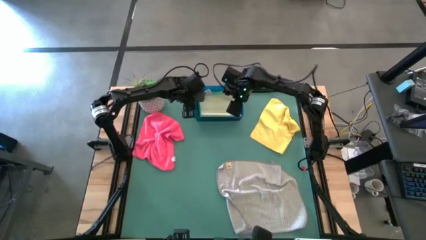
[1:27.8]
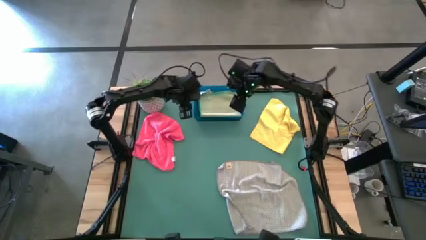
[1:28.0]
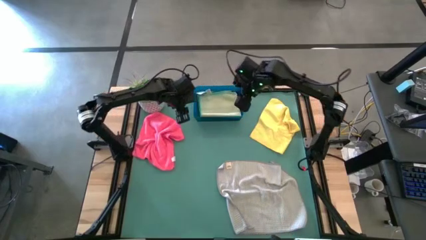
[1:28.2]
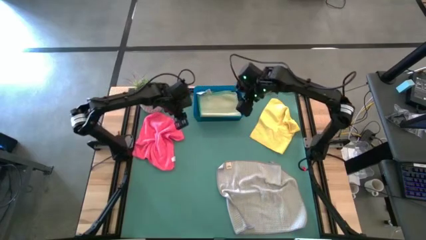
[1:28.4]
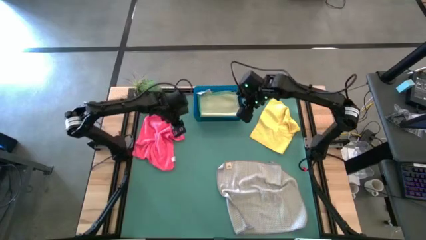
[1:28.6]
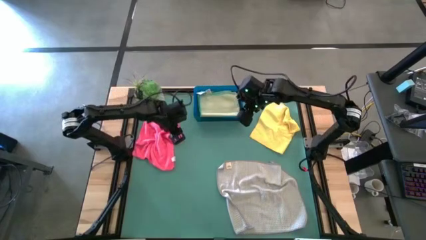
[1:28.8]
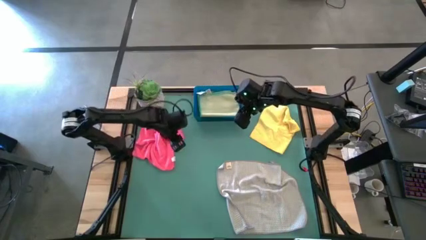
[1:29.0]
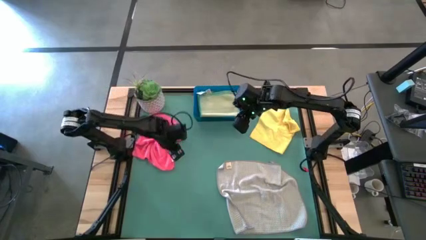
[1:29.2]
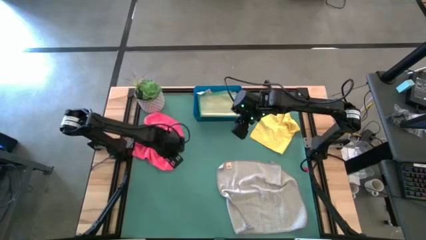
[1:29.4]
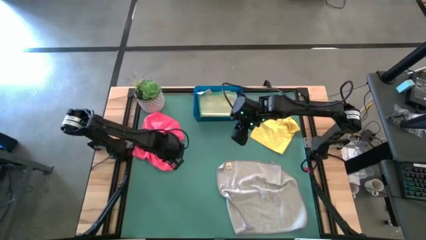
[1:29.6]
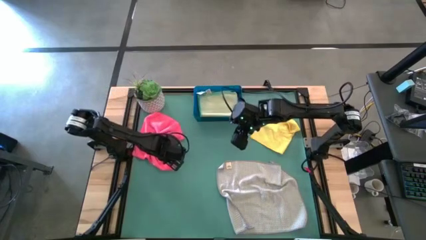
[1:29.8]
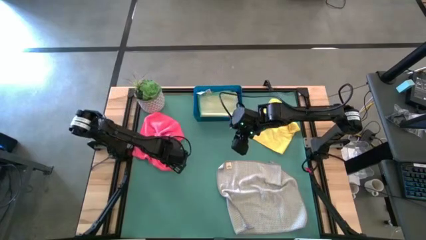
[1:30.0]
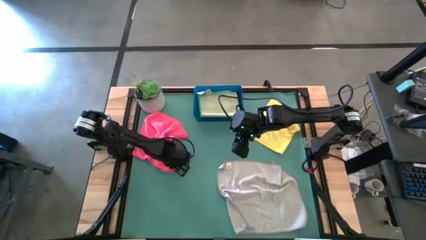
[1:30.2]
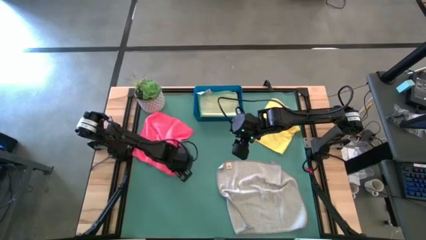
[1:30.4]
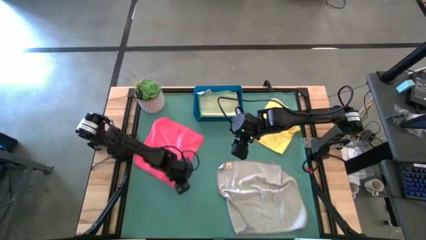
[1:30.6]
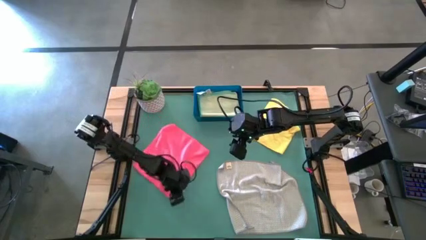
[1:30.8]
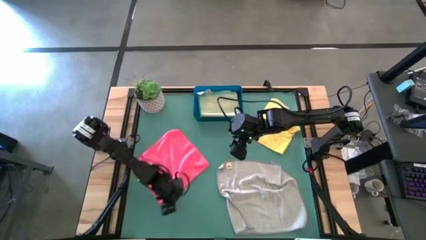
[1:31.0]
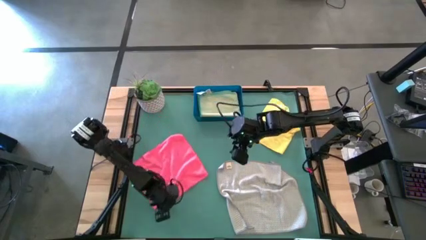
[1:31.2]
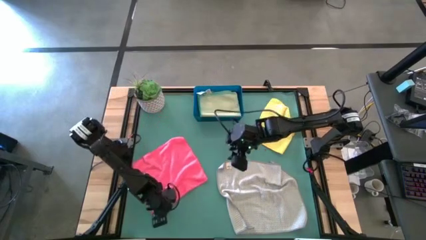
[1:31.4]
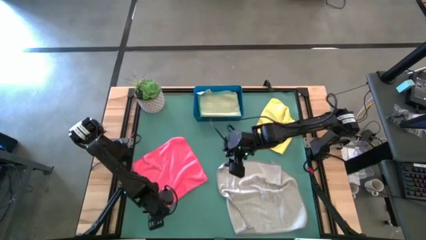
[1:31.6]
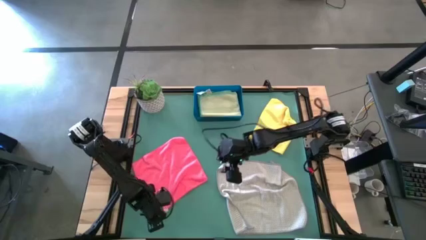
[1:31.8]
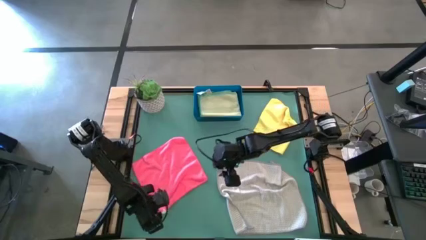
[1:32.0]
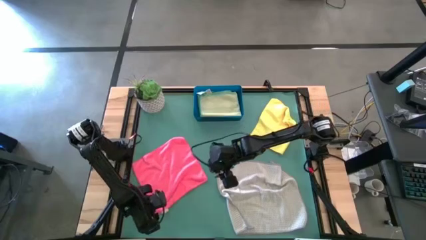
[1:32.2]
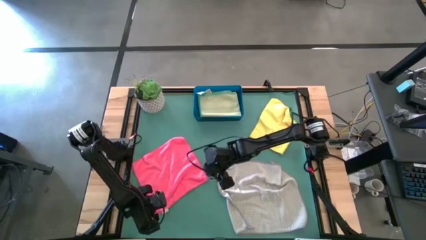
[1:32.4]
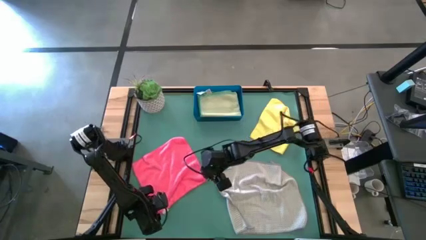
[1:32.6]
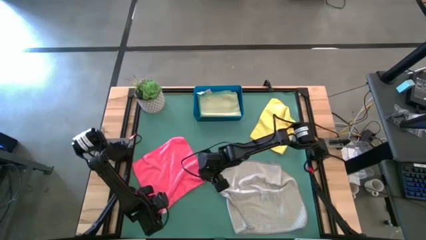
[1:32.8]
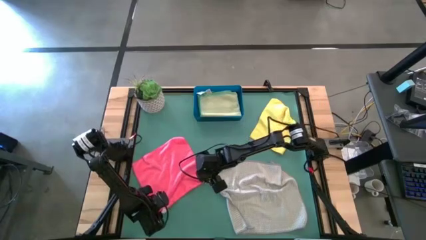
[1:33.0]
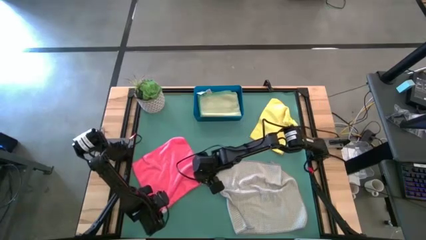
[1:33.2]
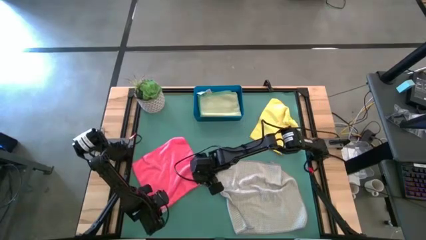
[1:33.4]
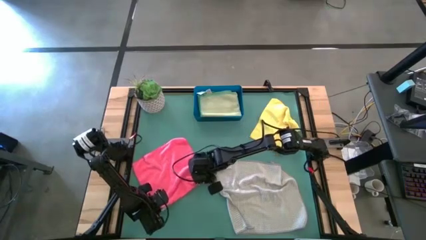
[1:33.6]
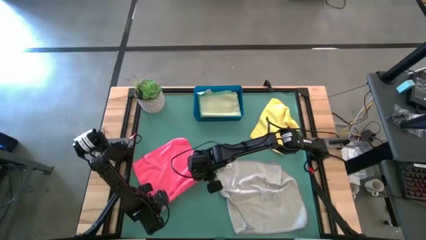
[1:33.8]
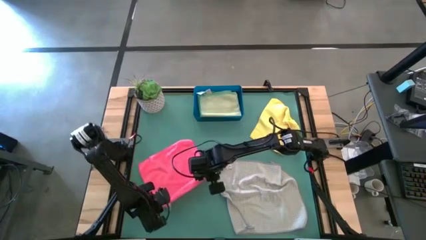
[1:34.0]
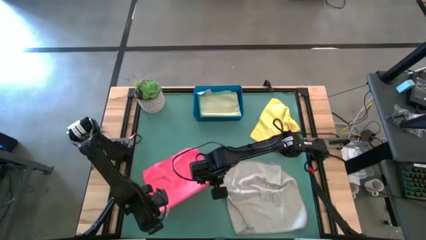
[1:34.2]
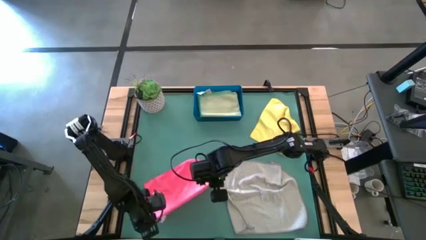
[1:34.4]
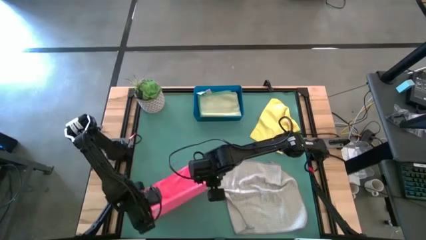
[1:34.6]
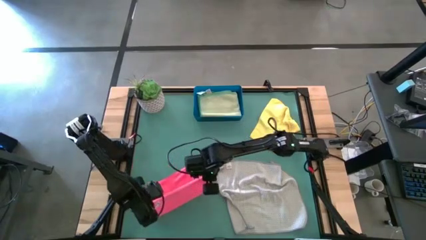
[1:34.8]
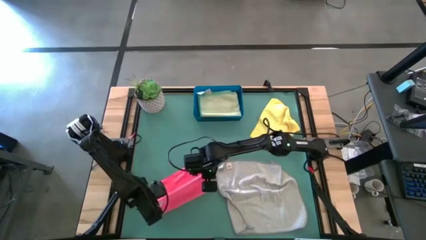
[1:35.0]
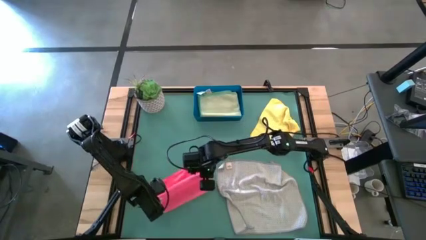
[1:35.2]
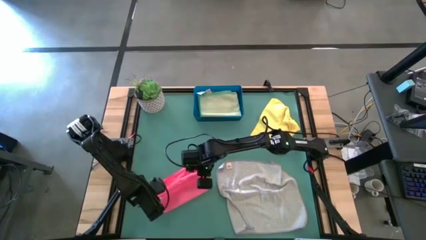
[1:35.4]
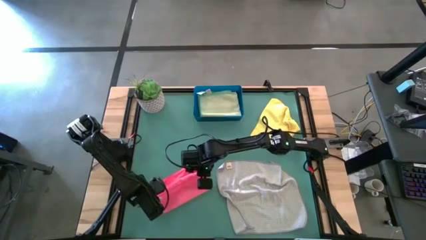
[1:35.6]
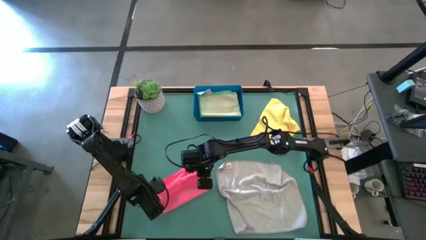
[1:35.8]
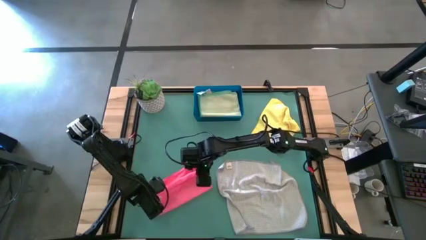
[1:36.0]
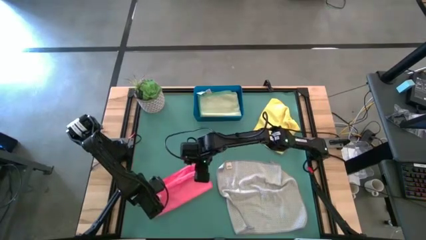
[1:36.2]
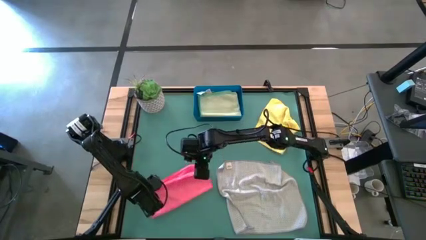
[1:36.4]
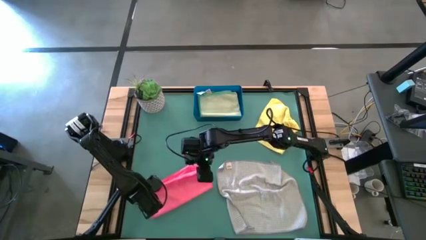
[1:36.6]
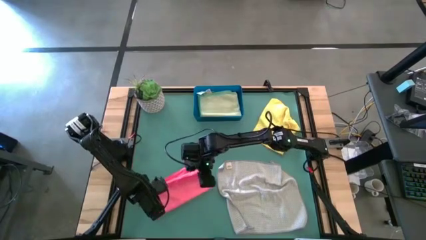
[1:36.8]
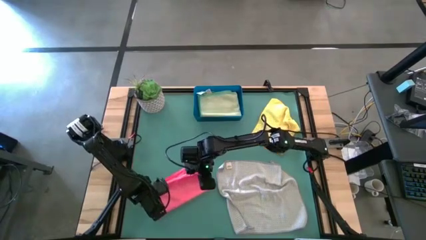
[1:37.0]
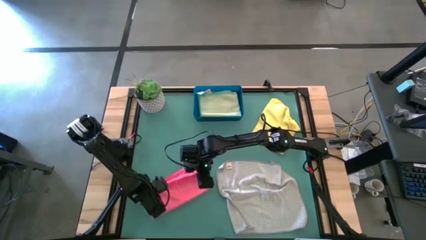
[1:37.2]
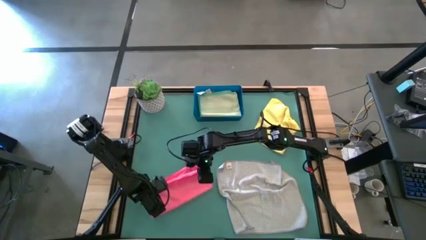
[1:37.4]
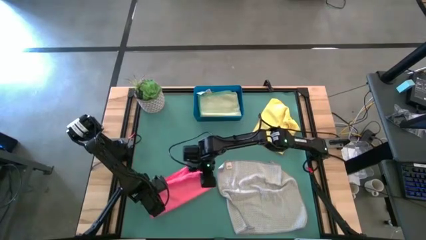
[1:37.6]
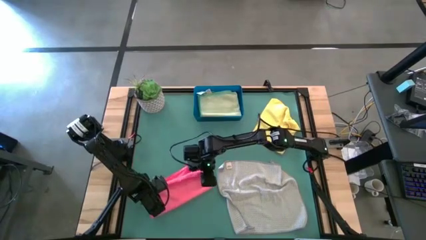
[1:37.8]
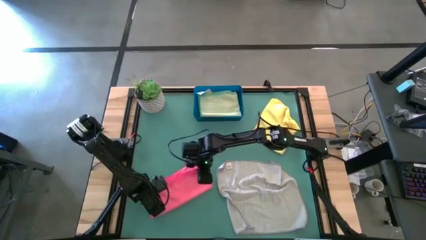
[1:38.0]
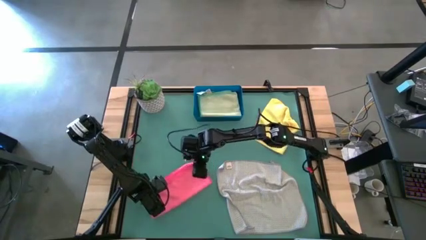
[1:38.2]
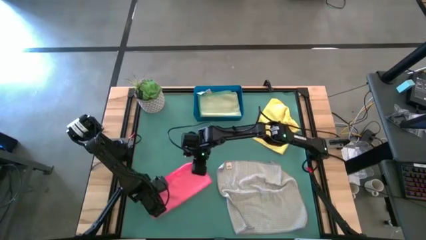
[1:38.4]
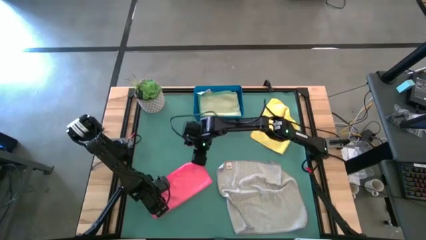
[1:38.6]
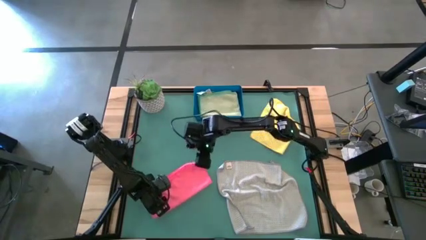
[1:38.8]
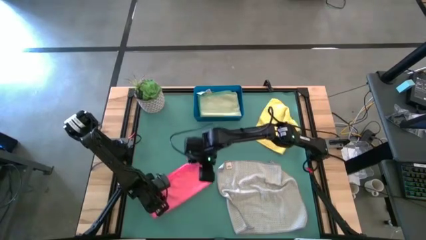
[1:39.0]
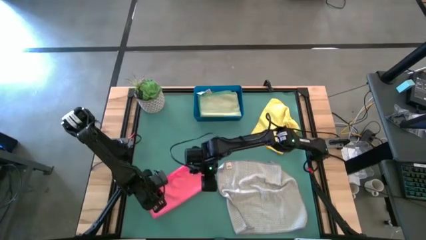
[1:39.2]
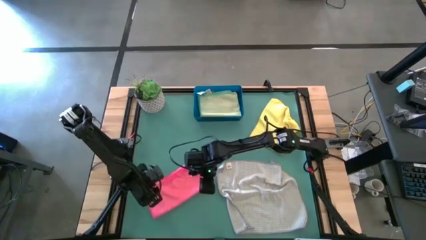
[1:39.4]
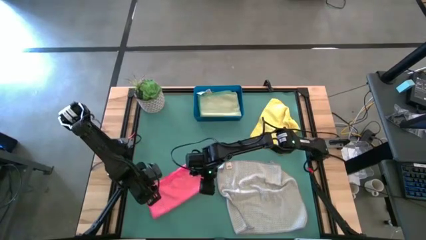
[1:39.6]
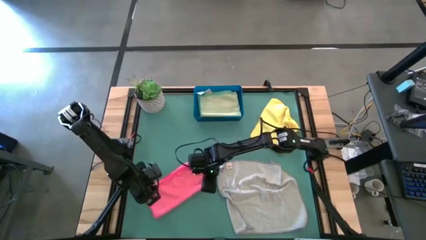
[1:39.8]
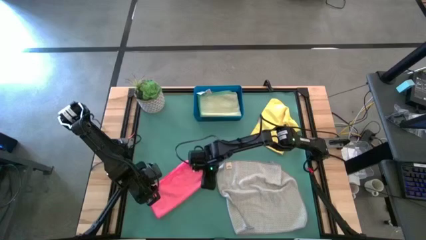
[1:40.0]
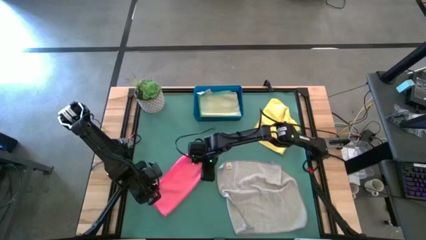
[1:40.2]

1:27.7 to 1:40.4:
Task: Fold microfiber towels
Fold the pink microfiber towel

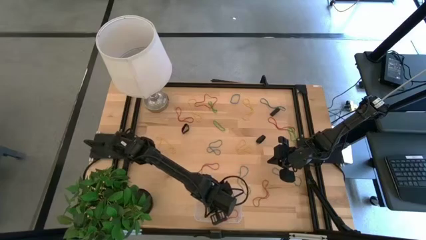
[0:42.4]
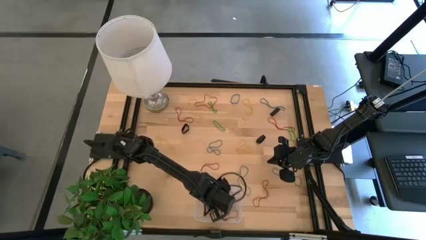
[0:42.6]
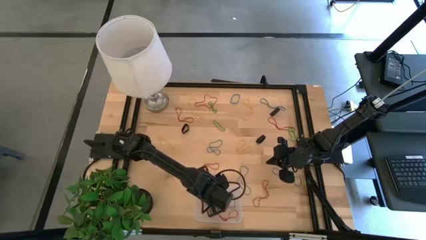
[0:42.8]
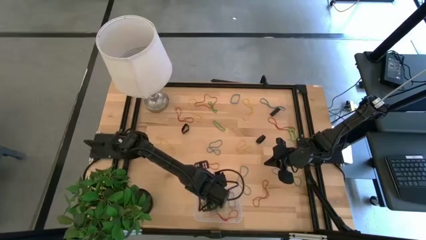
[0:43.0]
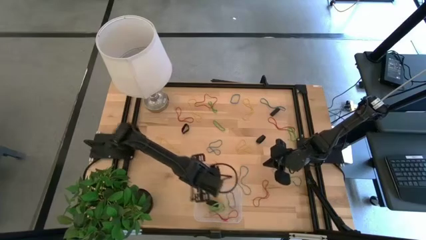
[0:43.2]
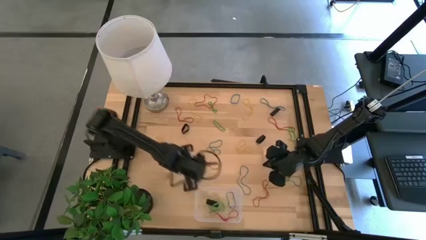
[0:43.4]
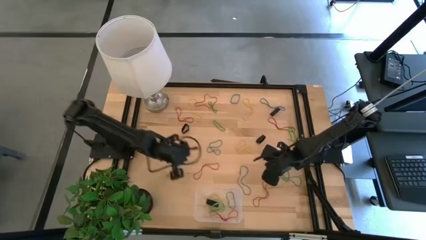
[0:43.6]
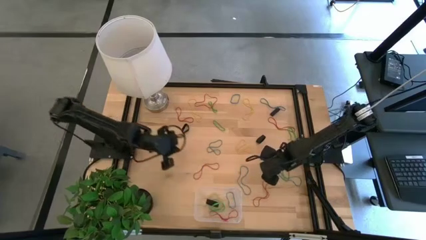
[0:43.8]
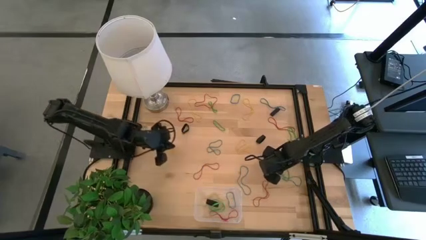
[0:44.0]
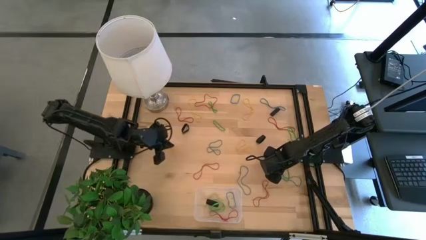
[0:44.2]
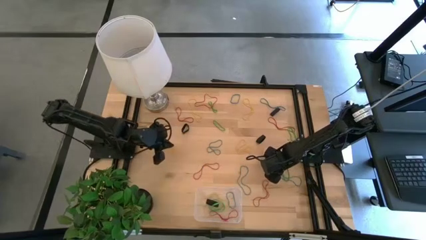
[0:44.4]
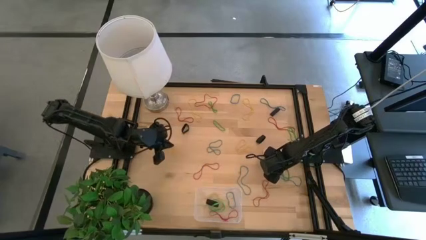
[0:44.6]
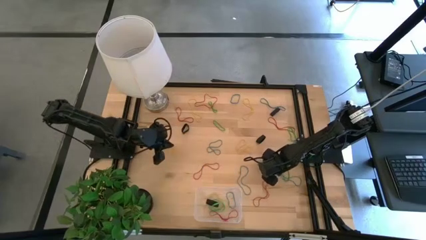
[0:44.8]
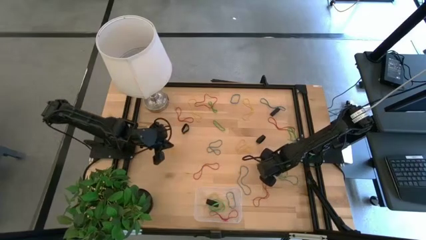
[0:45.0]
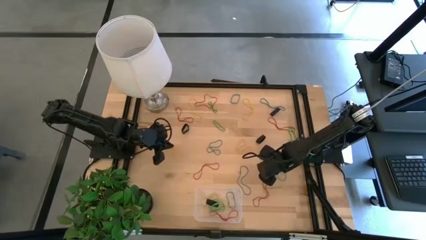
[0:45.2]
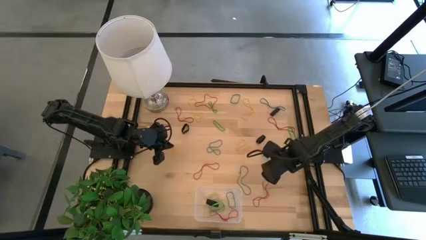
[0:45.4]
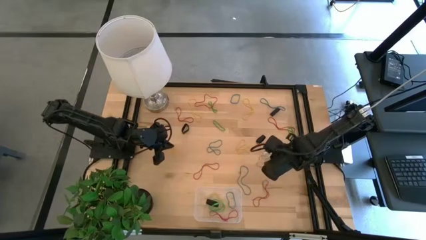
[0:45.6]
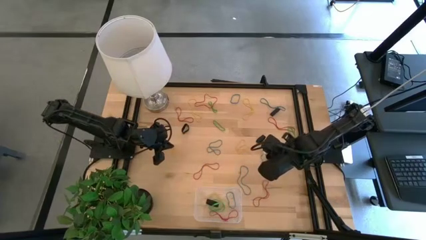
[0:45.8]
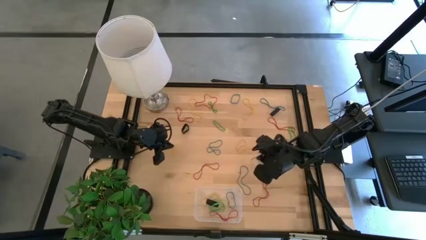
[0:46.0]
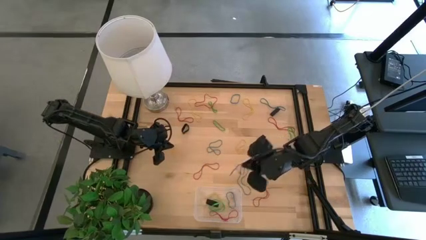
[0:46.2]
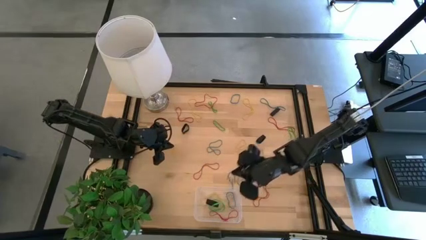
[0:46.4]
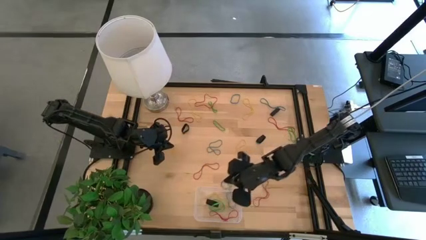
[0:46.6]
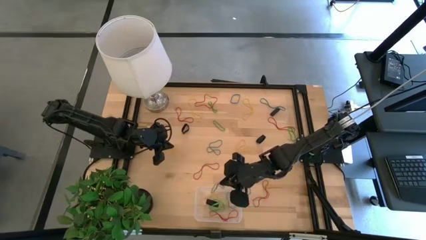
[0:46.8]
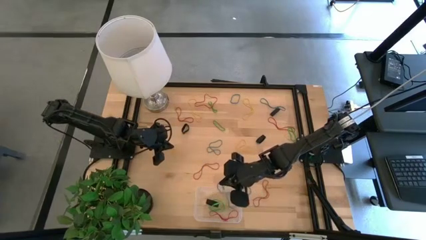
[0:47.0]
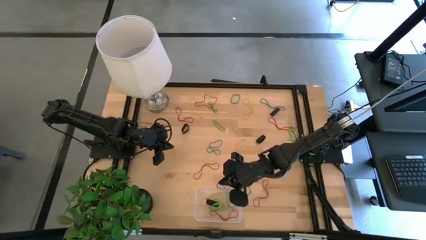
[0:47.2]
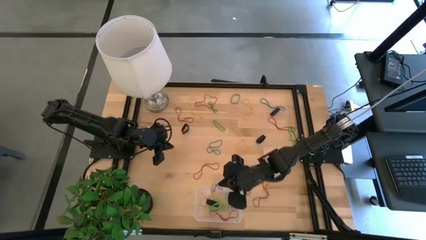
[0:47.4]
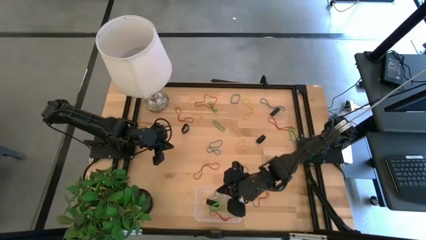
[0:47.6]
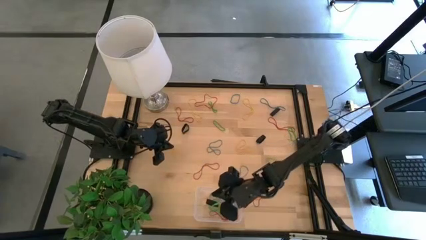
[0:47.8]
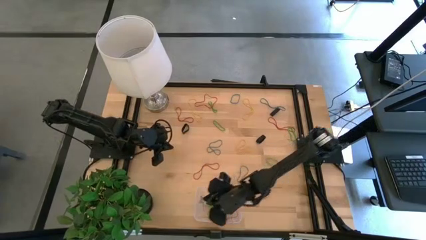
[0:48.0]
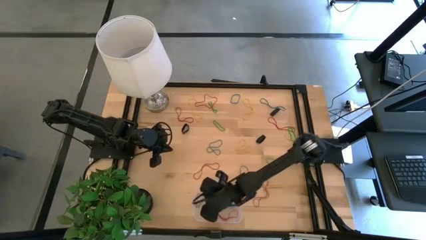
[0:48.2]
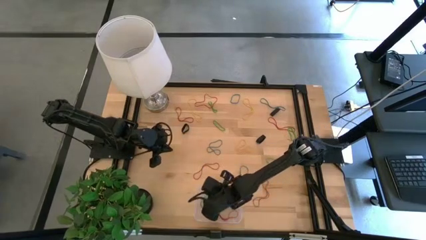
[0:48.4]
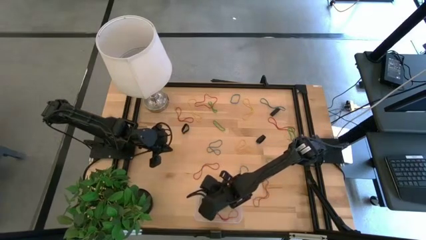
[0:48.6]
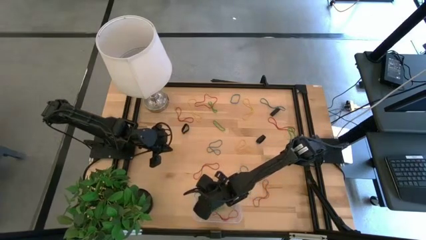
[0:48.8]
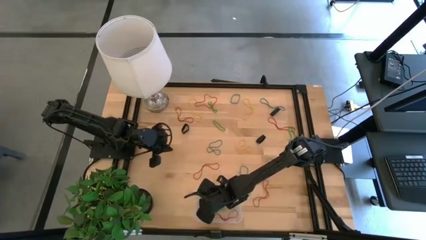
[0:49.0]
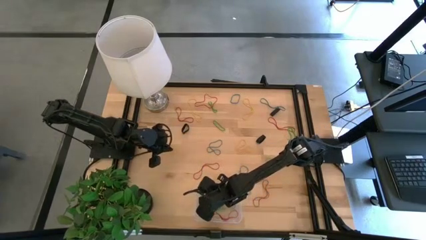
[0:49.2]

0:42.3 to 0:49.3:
Task: Pick and place rubber bands into bin
Put the blue rubber band into the transparent bin
